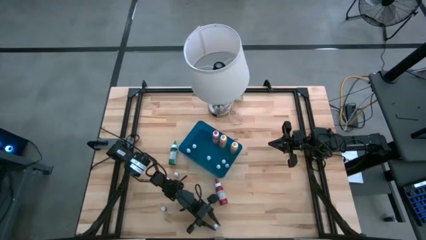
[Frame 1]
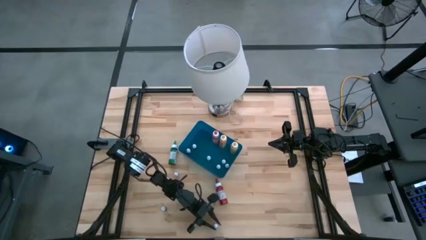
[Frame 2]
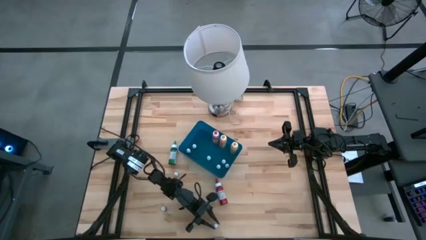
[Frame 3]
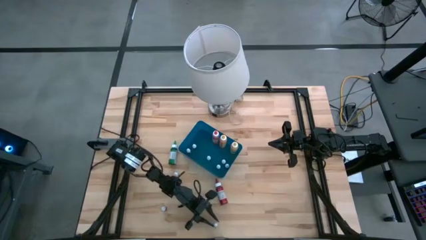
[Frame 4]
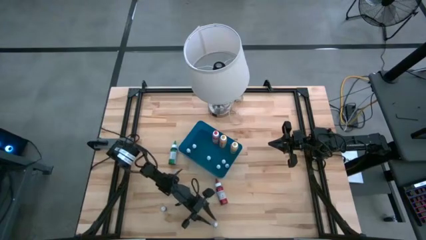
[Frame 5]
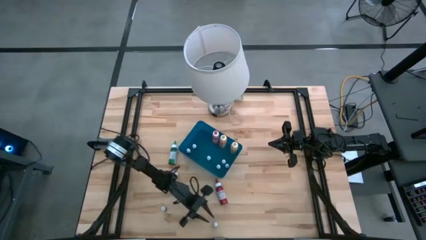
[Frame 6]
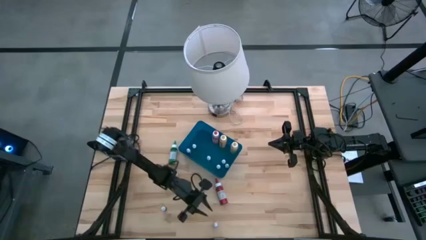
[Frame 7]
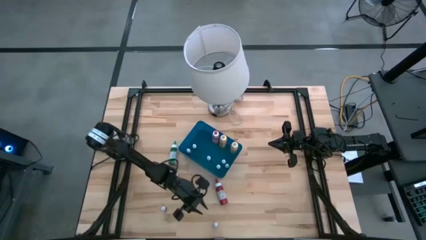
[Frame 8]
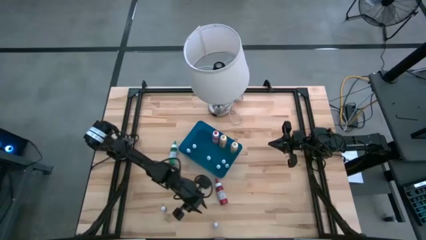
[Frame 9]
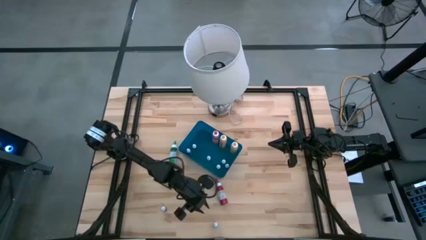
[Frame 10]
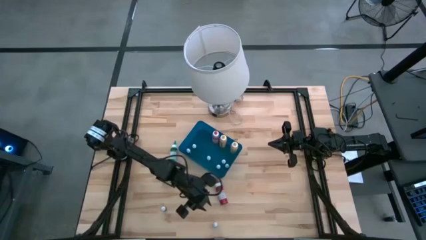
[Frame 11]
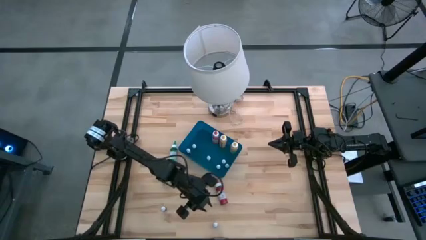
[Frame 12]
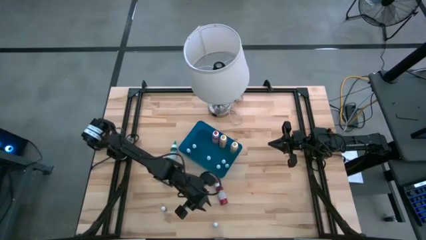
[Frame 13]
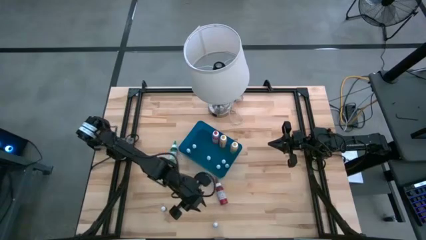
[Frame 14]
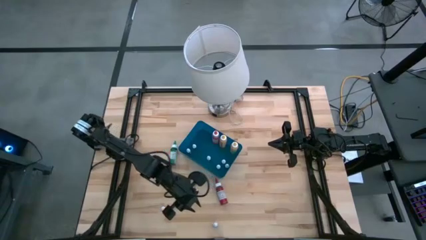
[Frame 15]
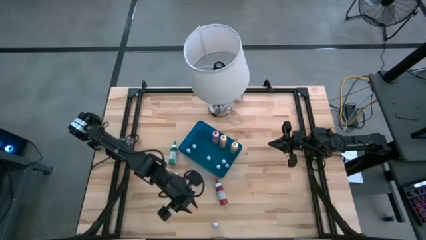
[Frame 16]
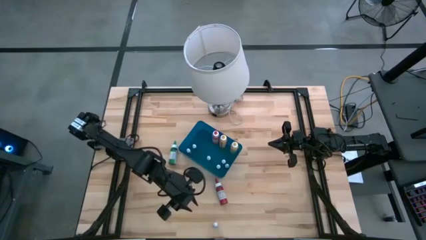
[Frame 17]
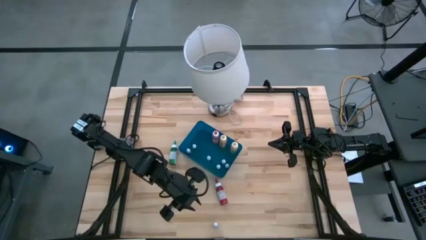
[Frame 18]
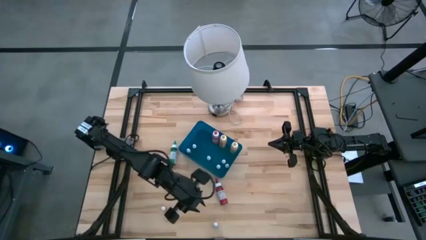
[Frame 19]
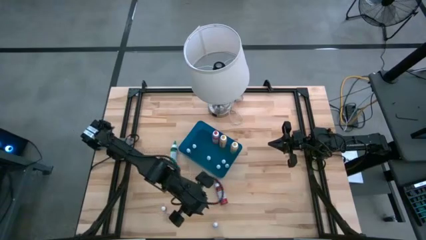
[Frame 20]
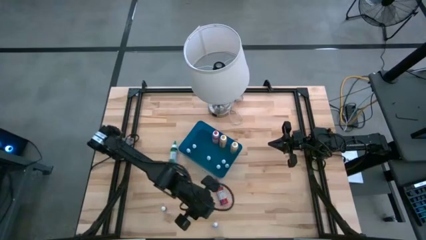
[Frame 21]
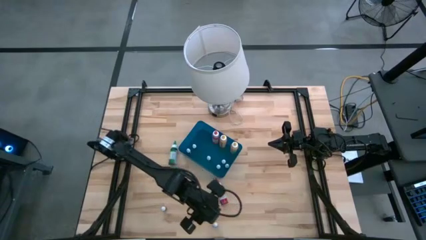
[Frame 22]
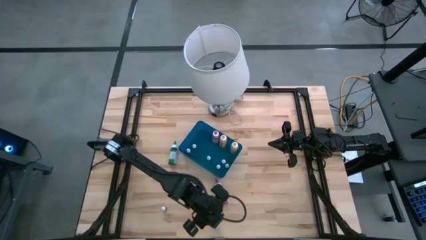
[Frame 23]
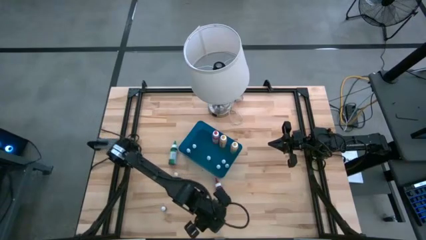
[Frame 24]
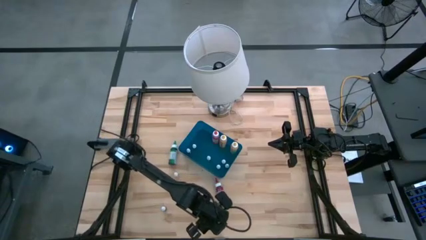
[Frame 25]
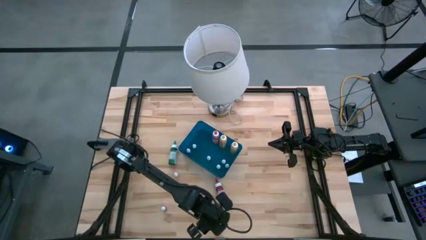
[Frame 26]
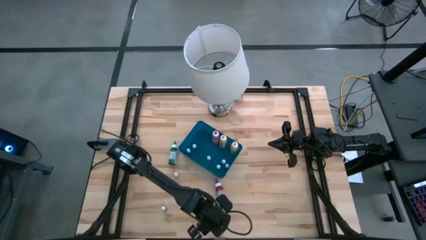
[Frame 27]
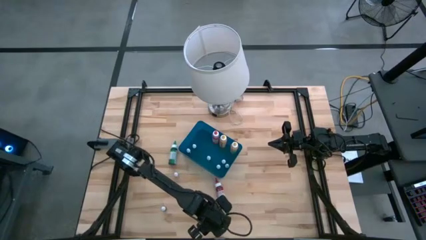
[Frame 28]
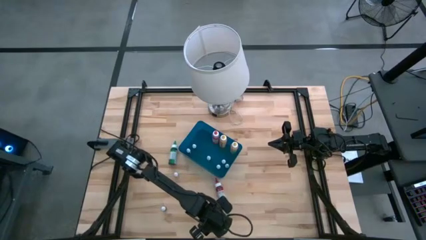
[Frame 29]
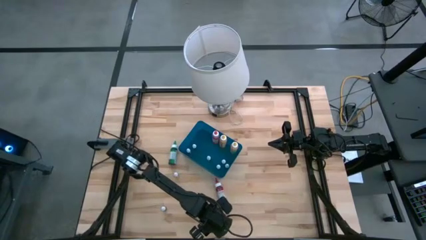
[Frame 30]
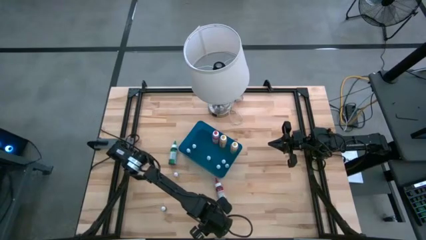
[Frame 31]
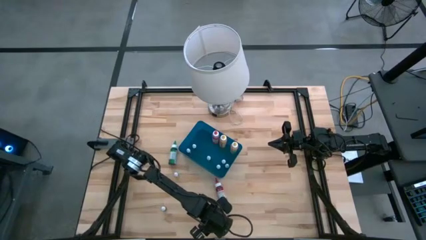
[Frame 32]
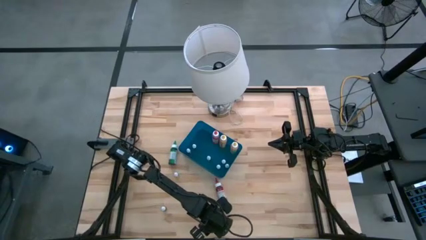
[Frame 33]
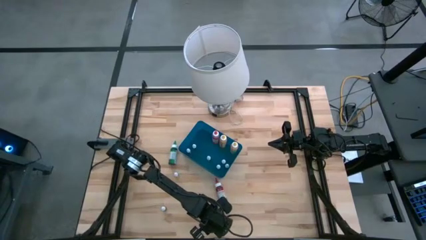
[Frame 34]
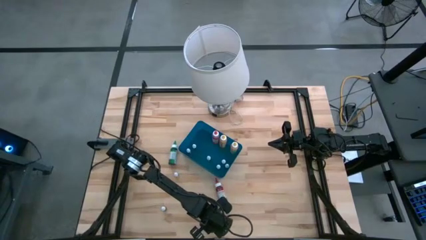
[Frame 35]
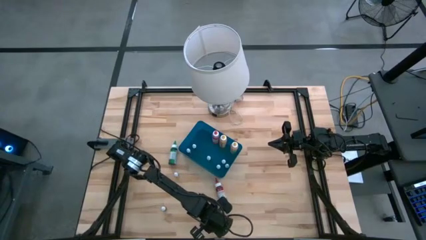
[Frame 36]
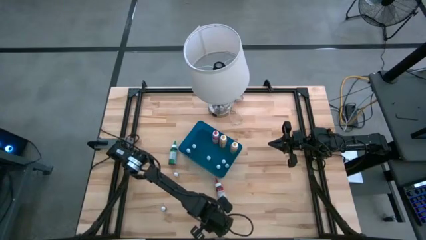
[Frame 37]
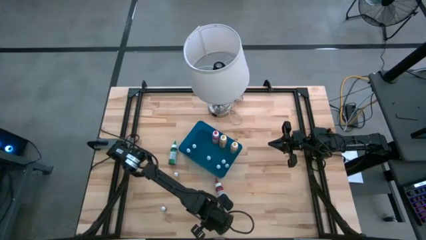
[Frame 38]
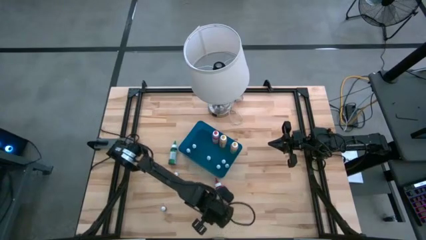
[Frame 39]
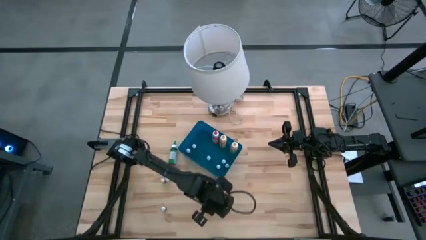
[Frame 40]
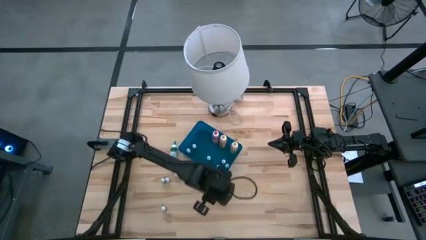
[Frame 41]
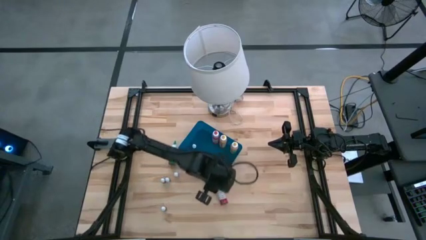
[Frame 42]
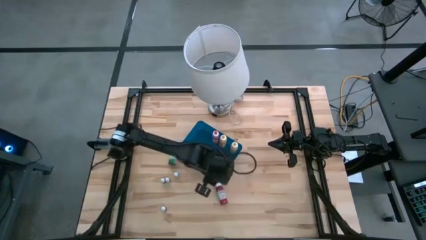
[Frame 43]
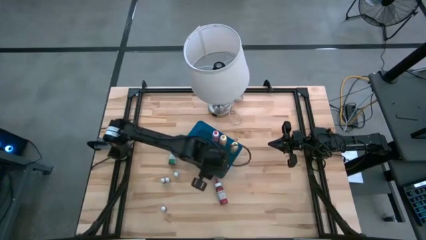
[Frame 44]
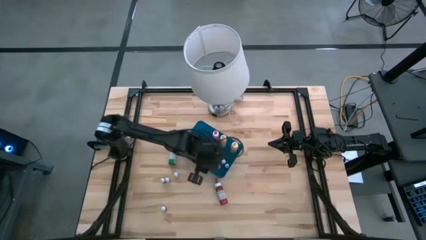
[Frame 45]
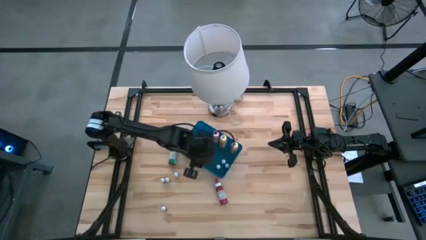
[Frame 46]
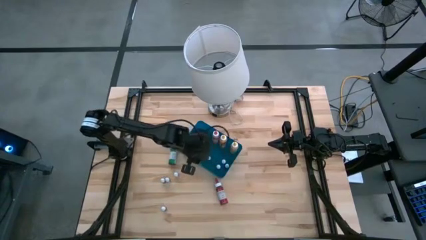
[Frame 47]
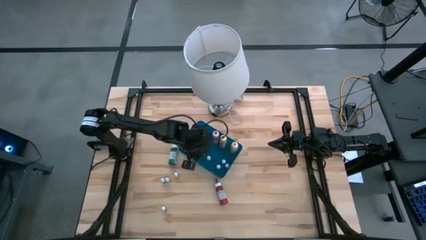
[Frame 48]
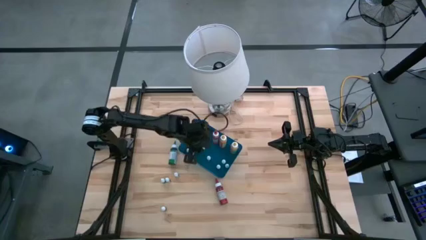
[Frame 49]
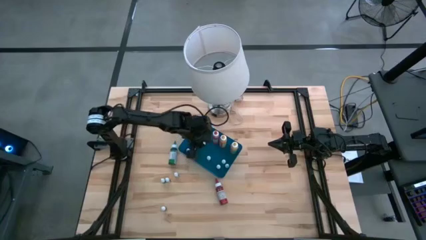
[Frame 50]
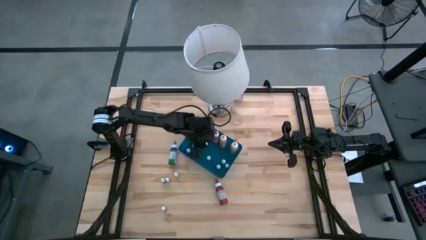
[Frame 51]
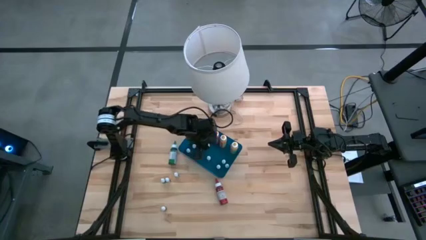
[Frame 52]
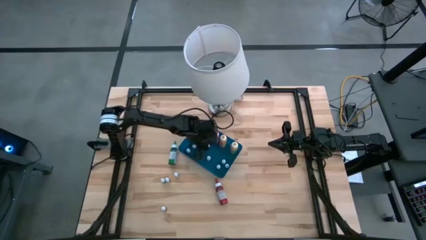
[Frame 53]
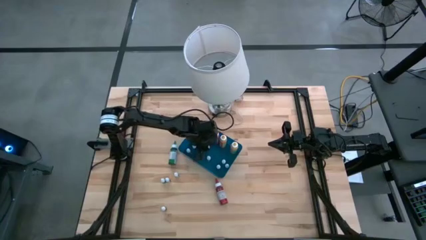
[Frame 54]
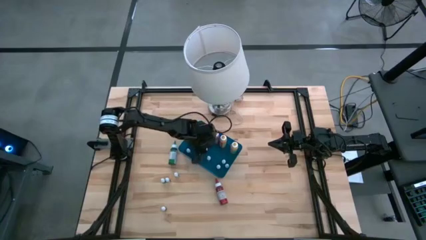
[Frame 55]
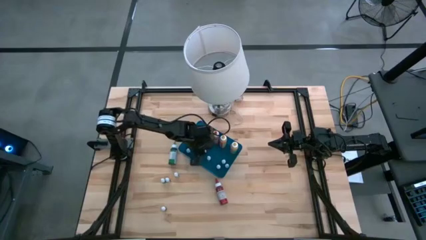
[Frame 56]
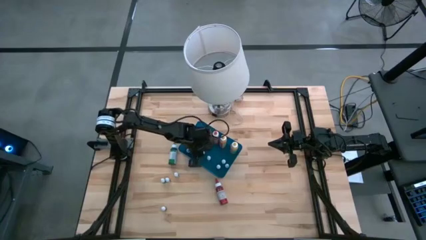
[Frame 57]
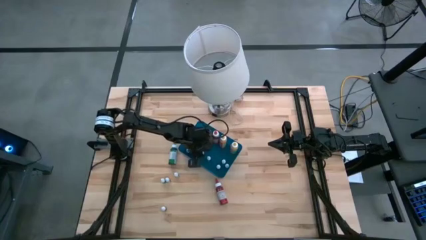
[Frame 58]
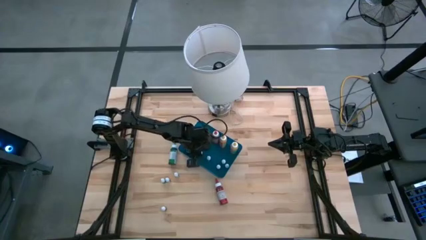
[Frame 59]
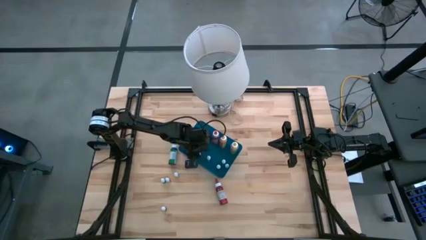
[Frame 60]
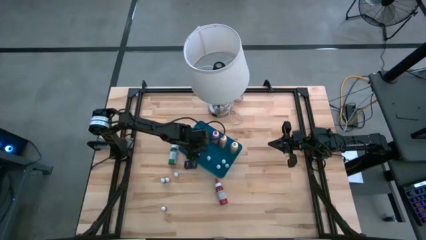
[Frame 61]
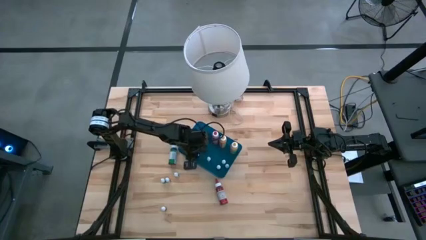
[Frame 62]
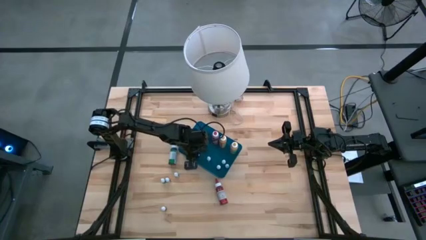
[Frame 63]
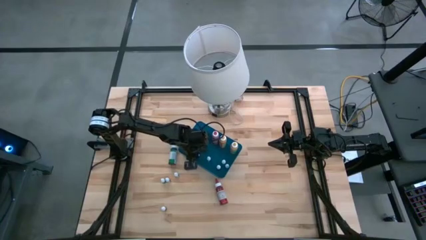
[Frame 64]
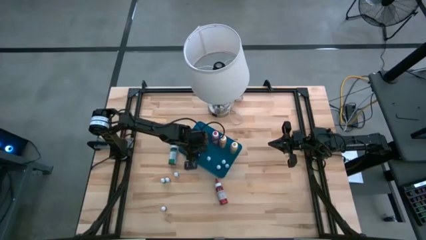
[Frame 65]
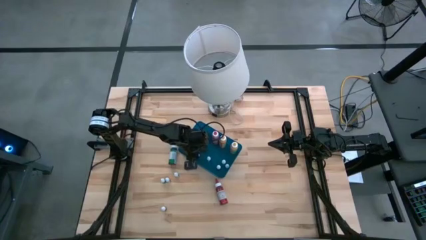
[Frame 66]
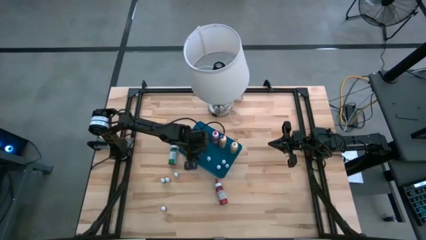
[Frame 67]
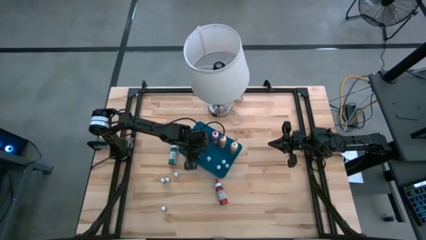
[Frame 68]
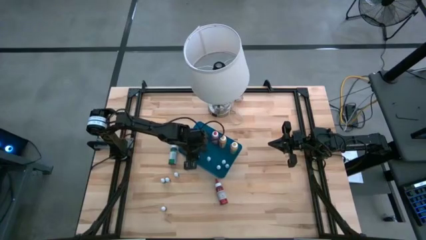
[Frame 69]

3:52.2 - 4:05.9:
Task: Pick & Place food coloring
Put the small blue food coloring bottle into the blue container
